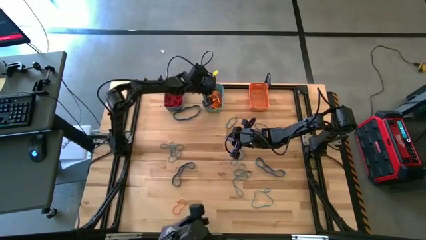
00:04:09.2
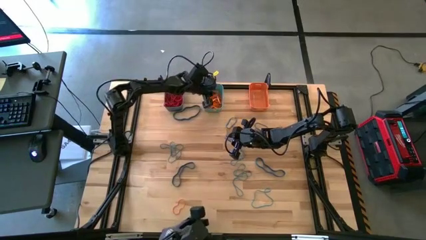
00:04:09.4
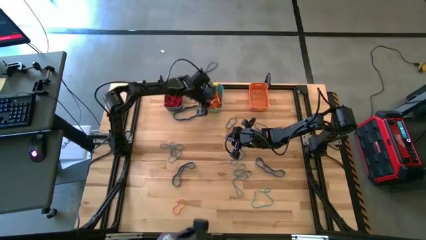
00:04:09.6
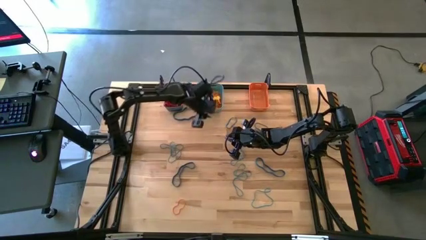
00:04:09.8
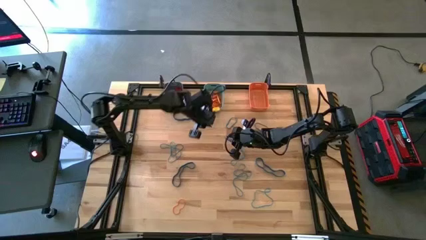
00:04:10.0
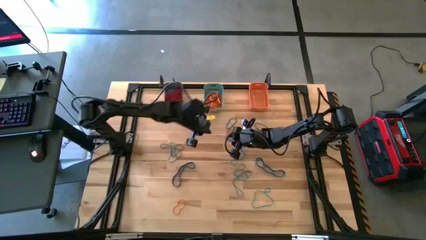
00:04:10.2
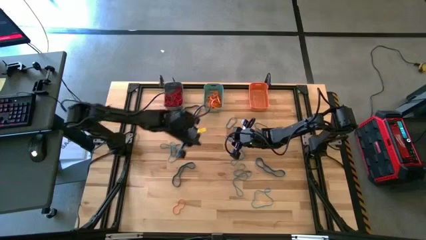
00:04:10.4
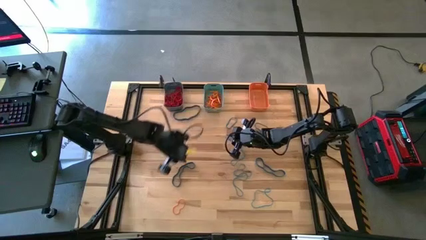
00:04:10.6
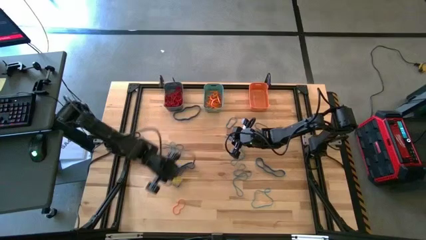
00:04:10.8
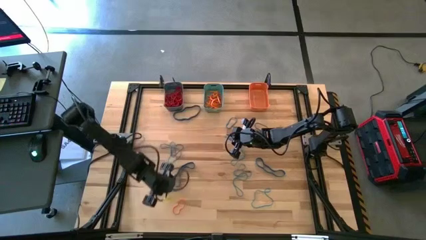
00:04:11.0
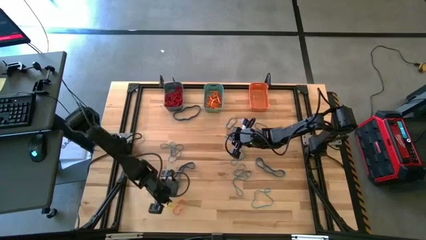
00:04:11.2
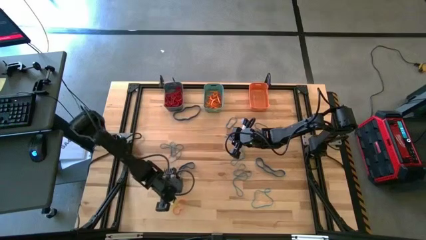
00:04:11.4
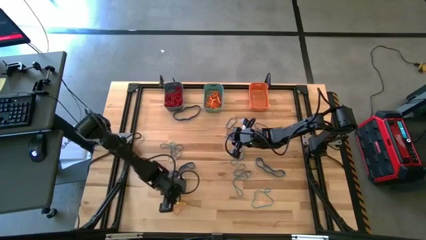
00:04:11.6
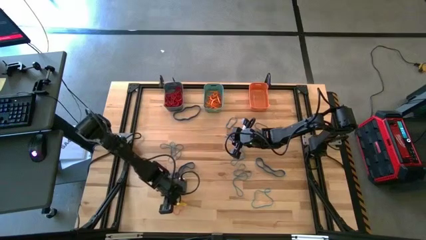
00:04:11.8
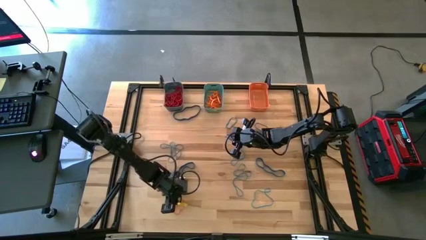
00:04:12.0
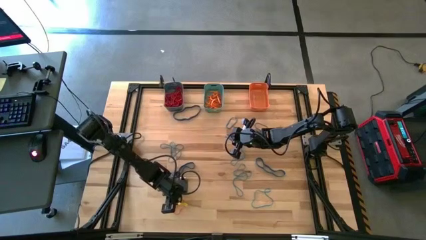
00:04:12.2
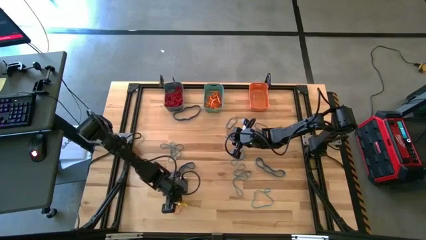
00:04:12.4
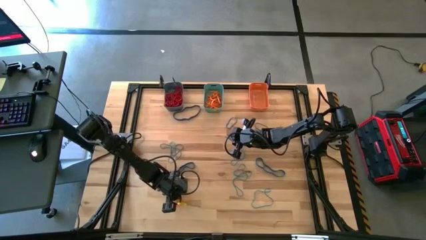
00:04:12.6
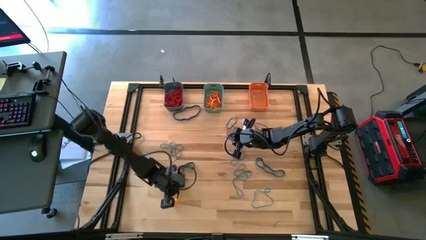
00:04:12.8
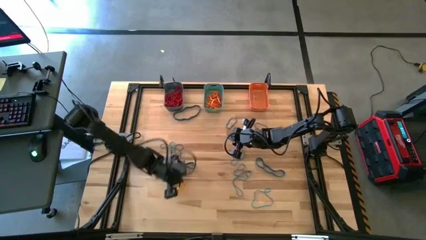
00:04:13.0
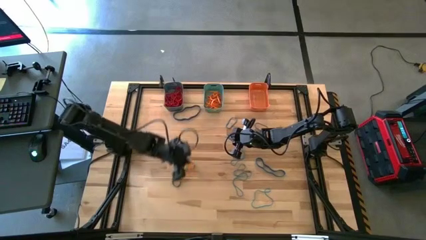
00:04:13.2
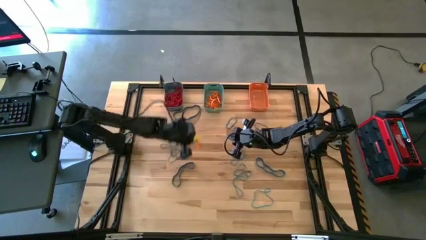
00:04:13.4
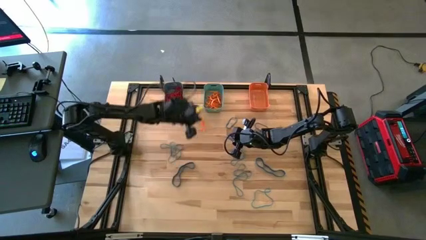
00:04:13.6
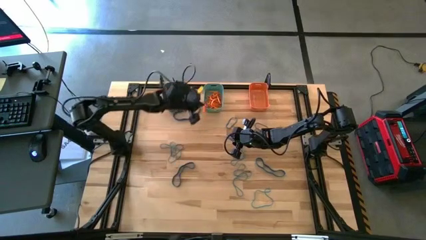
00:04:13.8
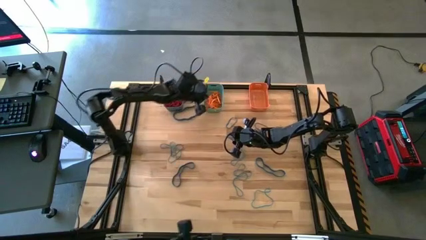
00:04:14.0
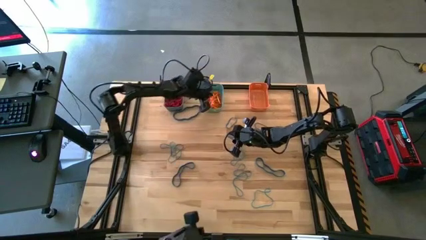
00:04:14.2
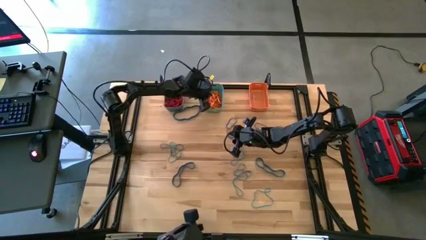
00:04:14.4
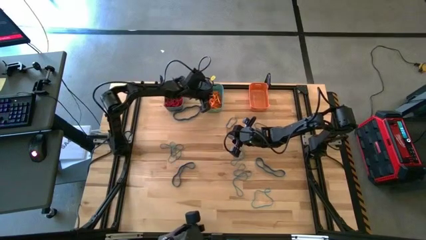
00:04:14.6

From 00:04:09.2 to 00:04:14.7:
Task: Sort rubber bands into baskets
Put the orange rubber band into the green bin

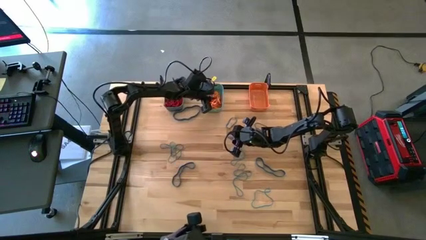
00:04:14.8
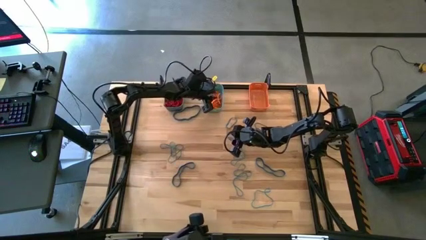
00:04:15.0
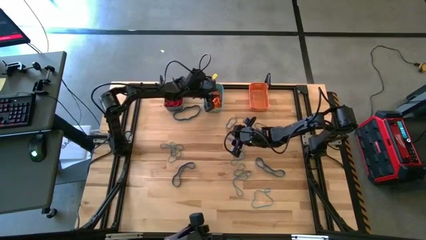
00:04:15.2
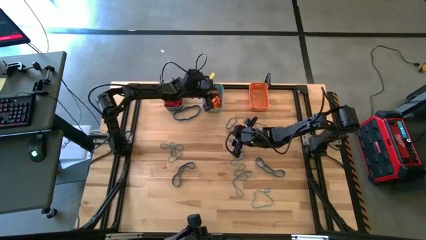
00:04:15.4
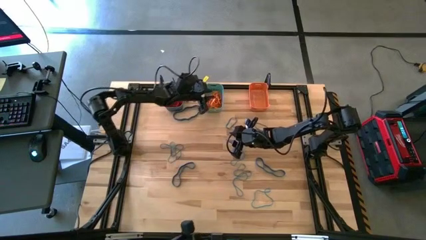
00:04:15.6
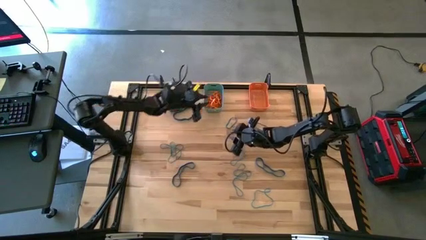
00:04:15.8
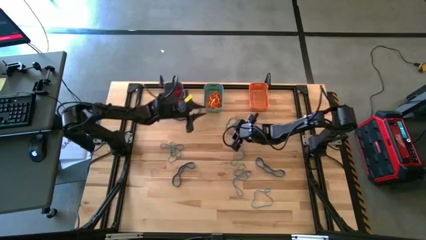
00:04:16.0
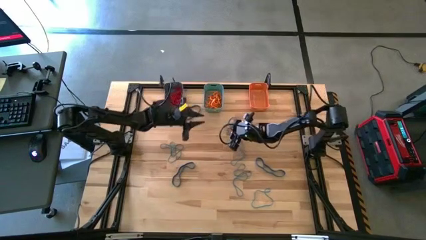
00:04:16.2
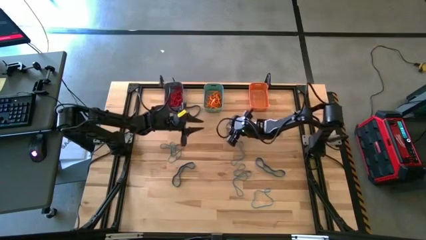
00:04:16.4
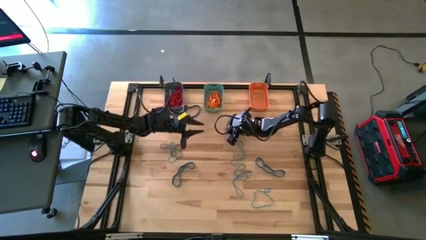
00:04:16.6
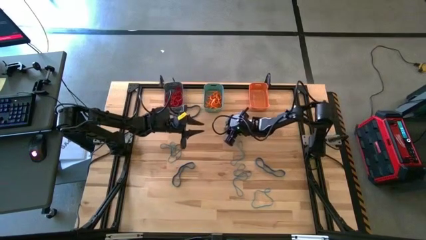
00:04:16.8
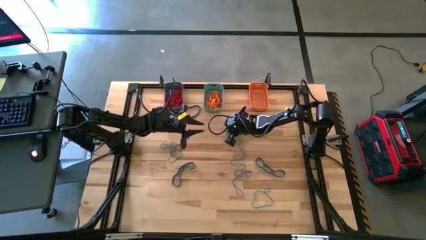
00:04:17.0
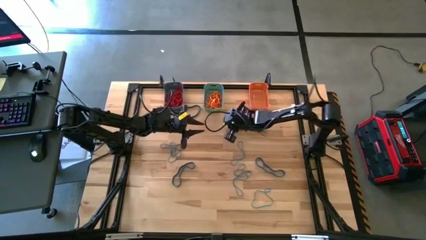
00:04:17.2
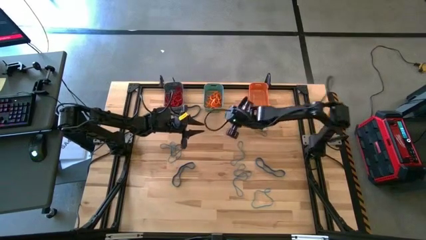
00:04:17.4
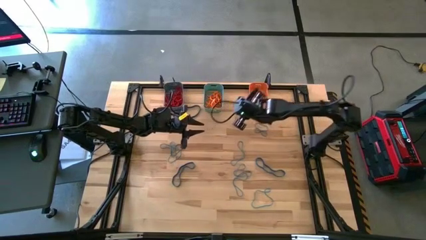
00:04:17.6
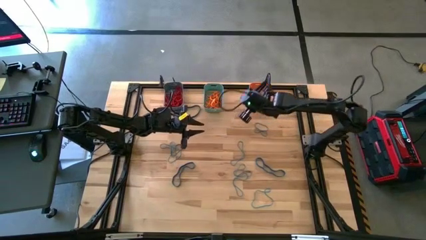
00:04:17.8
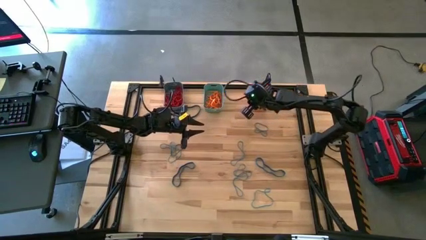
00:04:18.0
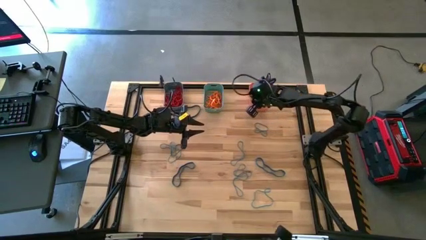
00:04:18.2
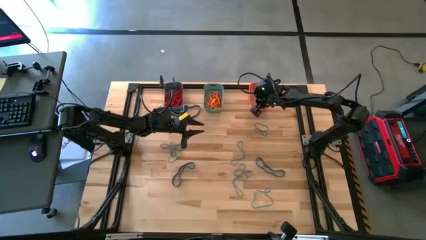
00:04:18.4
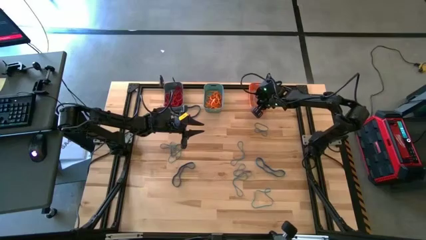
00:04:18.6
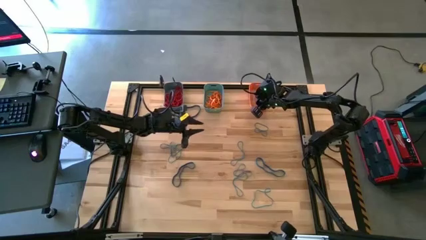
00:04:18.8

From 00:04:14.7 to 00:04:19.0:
Put the blue rubber band into the orange bin

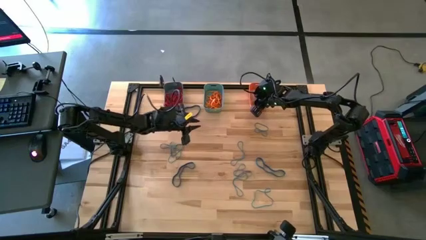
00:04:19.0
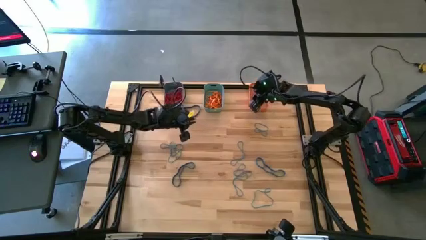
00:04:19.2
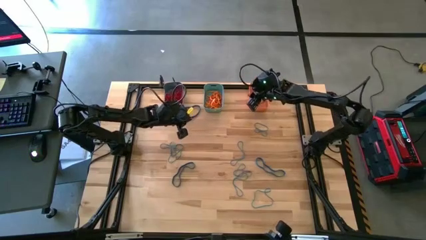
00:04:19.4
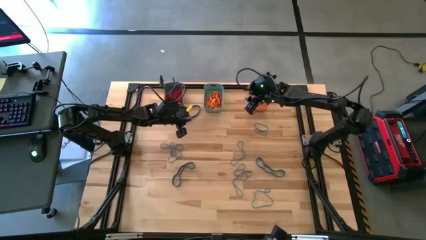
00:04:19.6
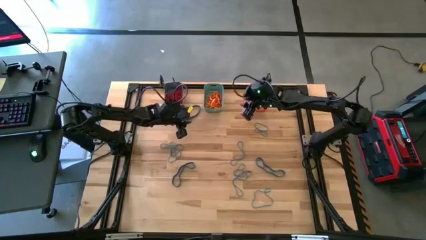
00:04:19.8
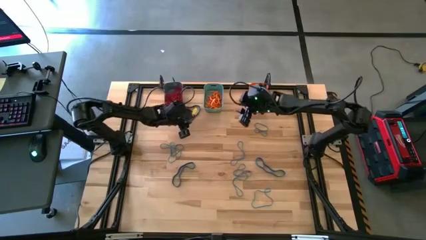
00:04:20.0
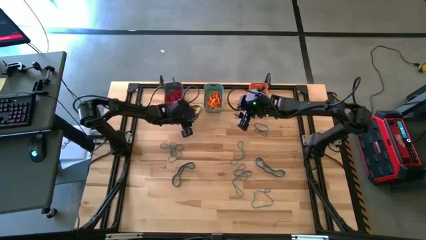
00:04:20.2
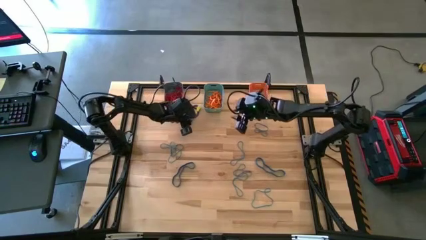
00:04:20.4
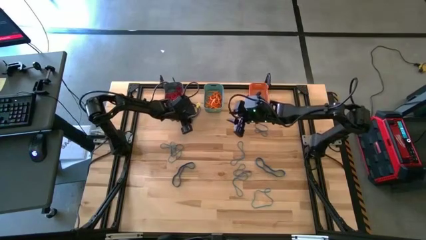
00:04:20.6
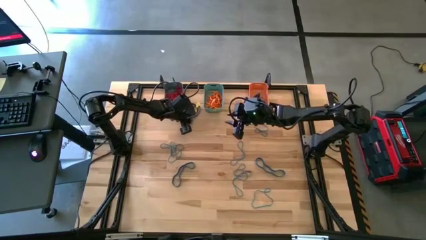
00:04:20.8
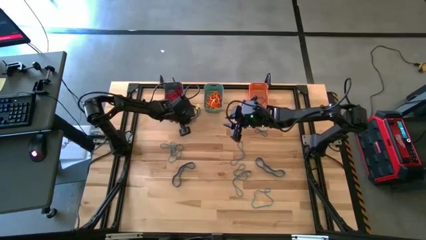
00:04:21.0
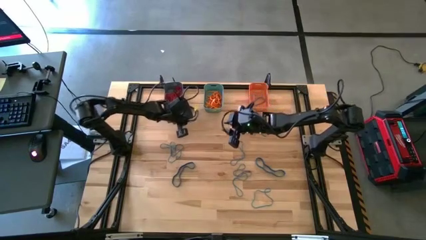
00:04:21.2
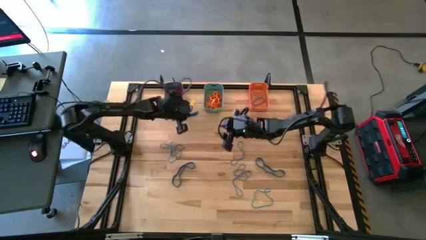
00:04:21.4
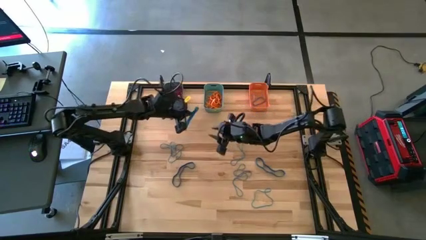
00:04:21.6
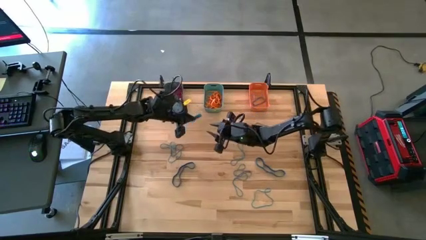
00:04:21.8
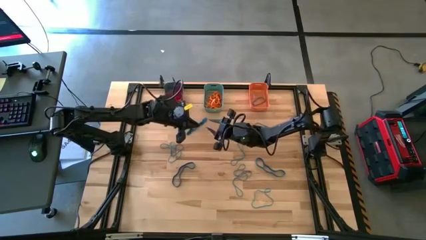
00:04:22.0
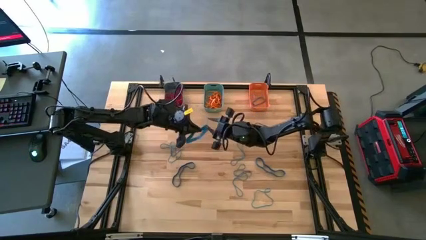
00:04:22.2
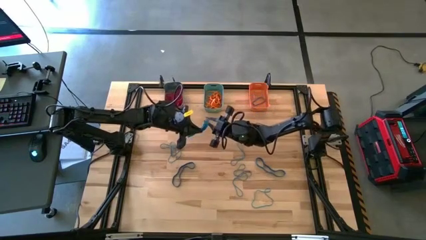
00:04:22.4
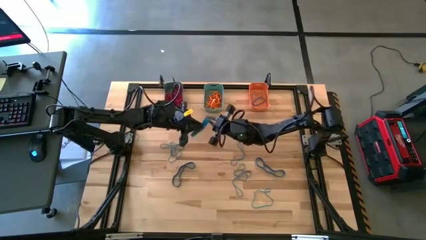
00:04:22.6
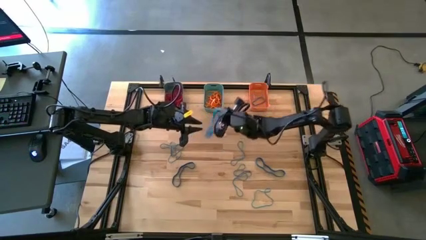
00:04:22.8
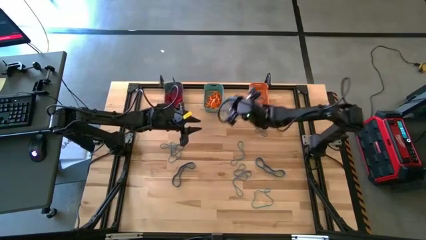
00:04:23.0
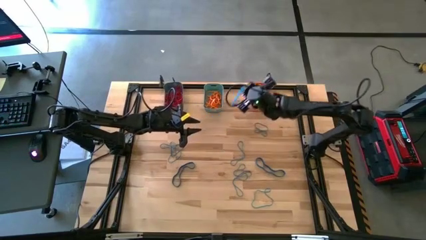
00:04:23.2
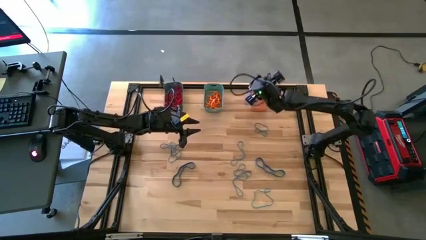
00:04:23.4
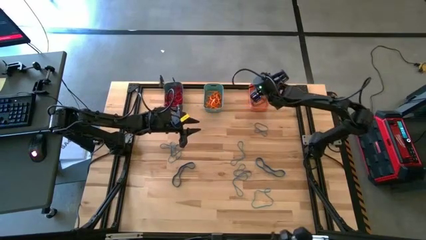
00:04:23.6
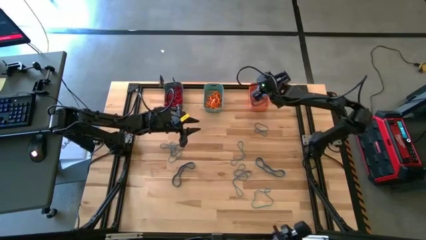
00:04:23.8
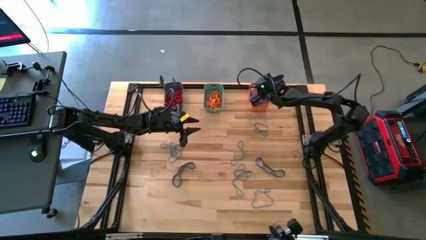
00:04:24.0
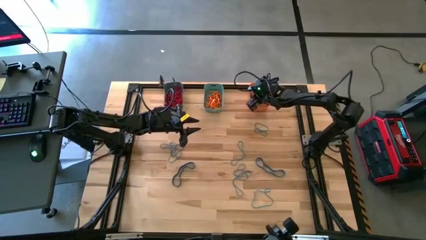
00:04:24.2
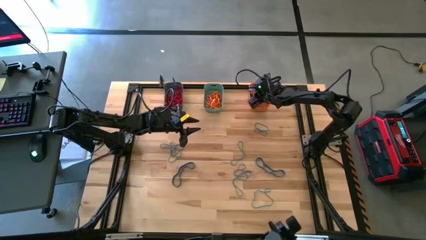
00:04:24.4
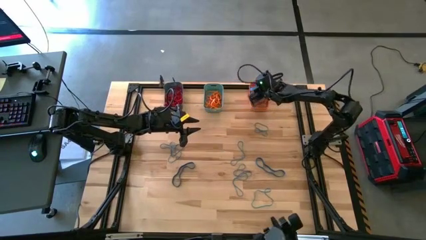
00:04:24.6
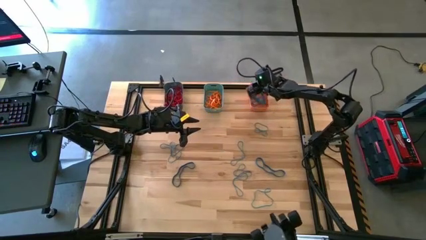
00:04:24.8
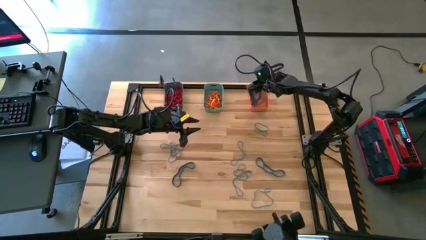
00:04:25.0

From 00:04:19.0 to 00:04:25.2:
Put the blue rubber band into the orange bin

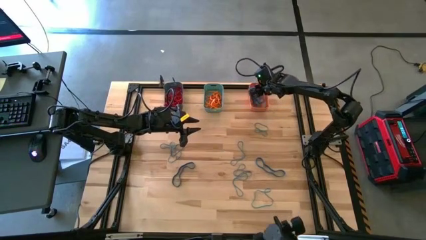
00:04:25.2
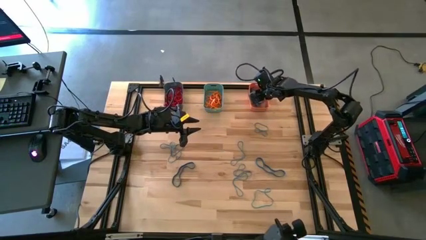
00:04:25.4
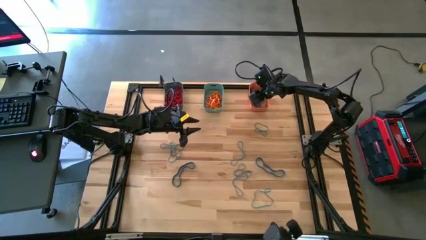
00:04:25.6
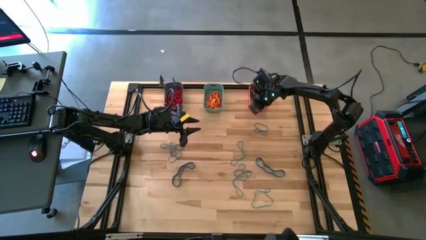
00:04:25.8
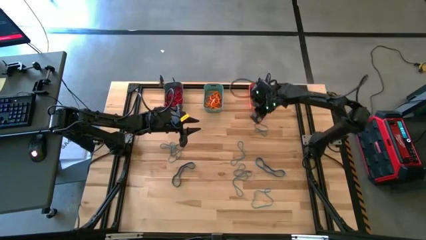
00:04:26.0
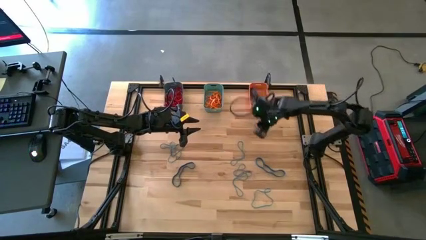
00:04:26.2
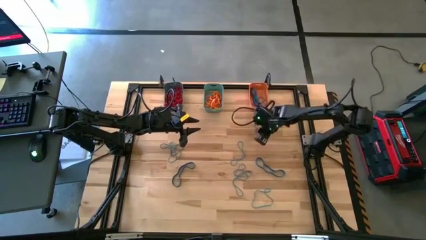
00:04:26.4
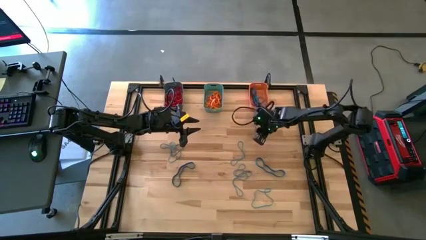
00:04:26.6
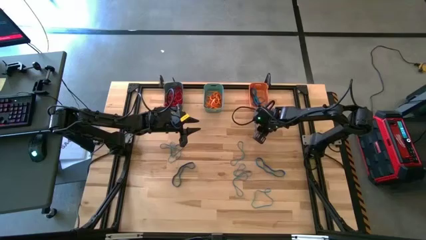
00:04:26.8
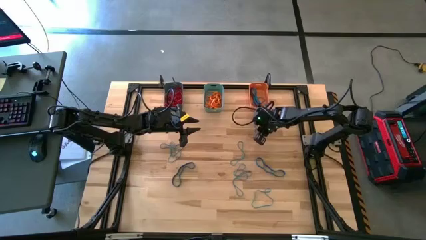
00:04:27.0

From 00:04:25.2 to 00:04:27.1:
Put the blue rubber band into the orange bin
